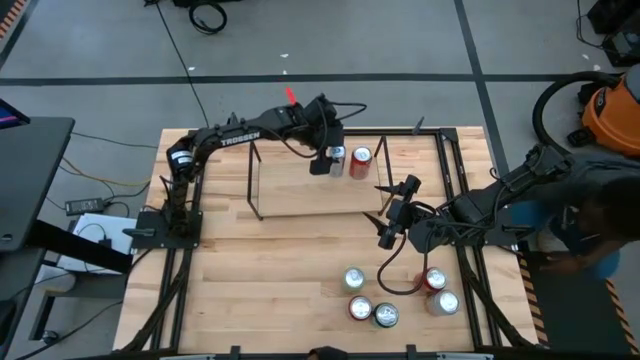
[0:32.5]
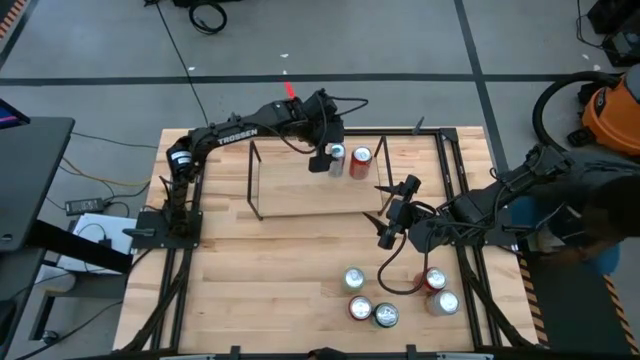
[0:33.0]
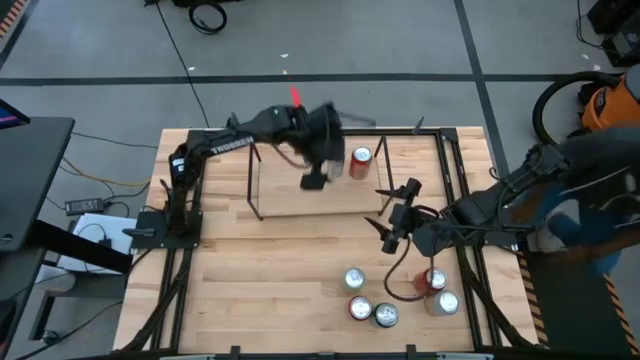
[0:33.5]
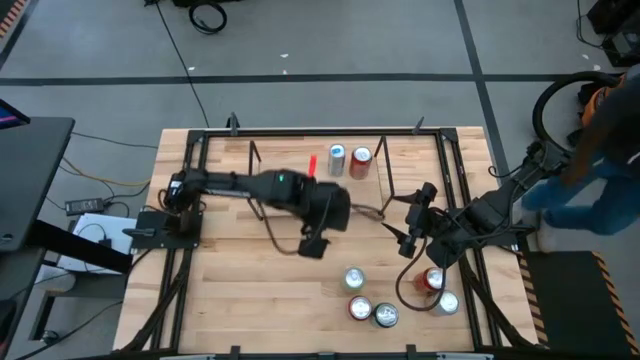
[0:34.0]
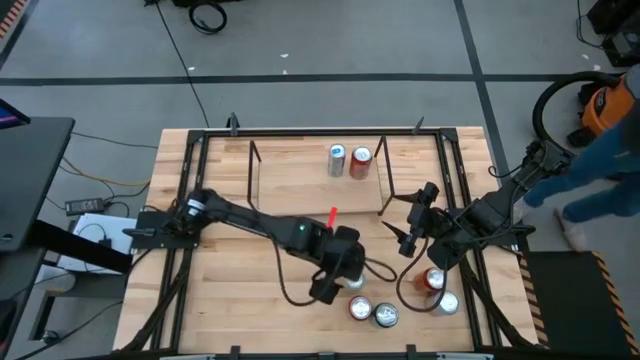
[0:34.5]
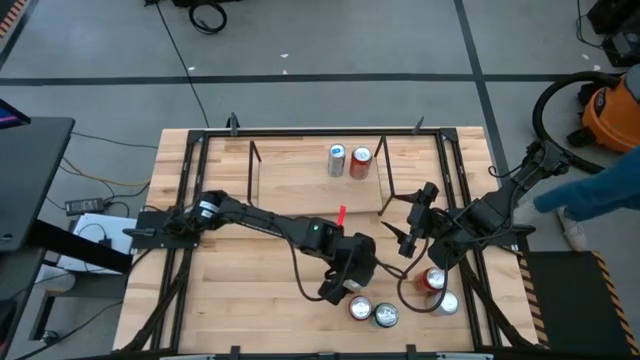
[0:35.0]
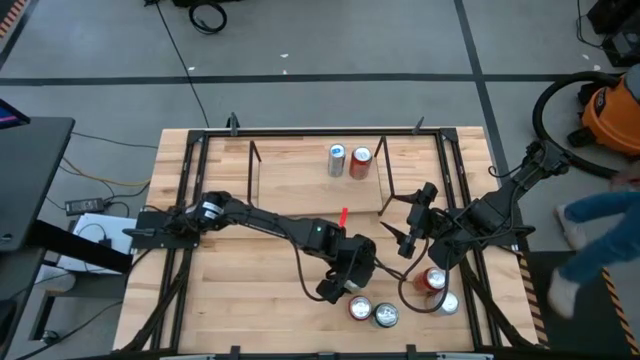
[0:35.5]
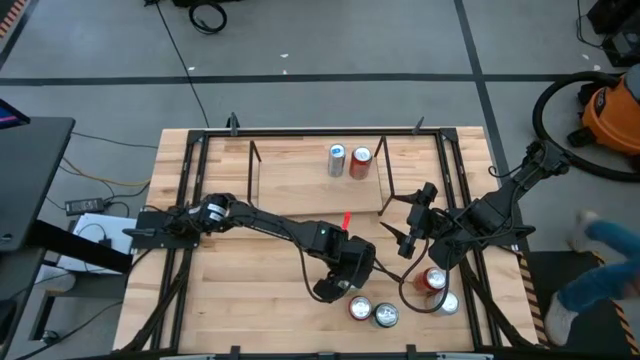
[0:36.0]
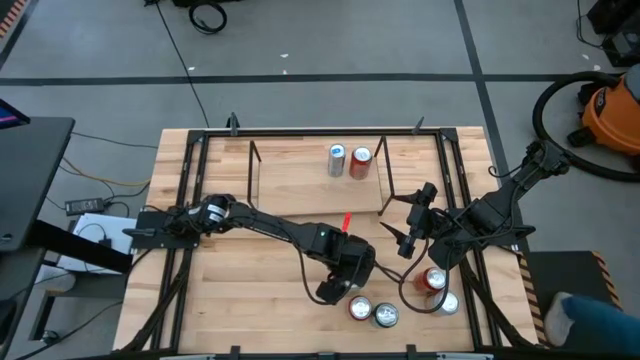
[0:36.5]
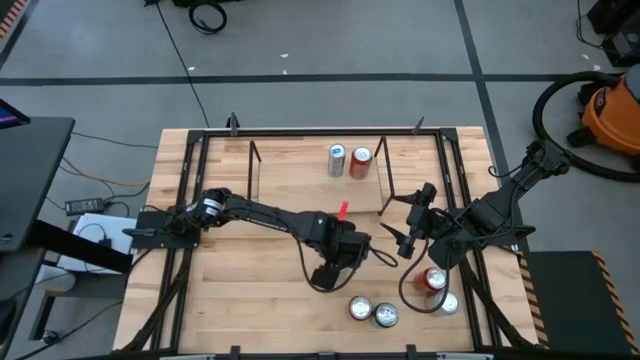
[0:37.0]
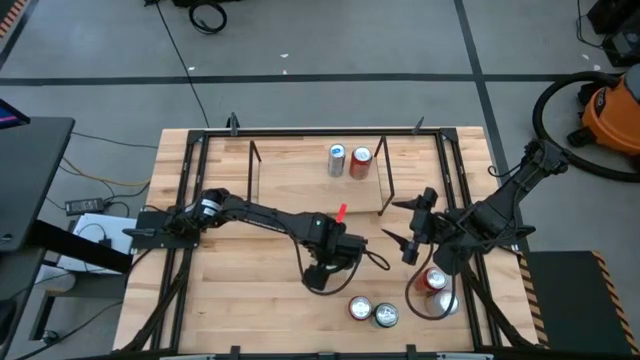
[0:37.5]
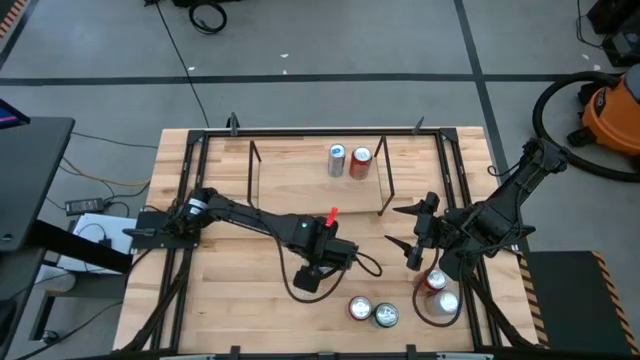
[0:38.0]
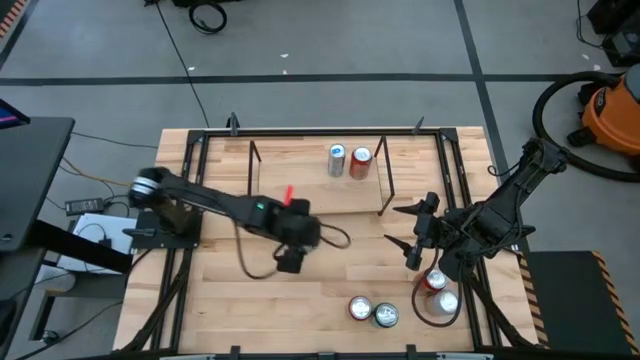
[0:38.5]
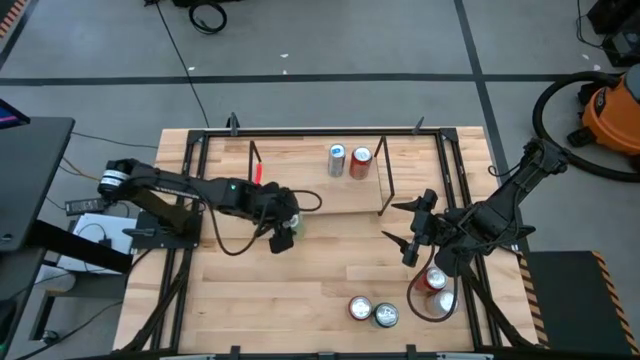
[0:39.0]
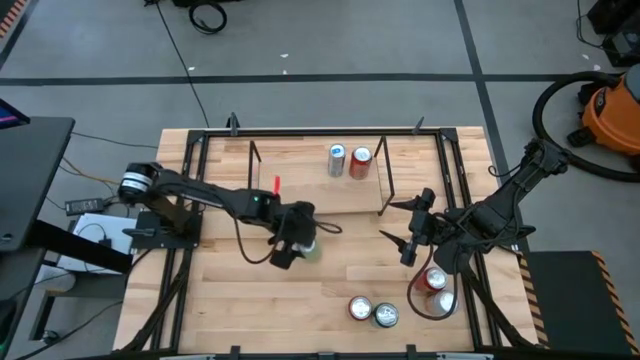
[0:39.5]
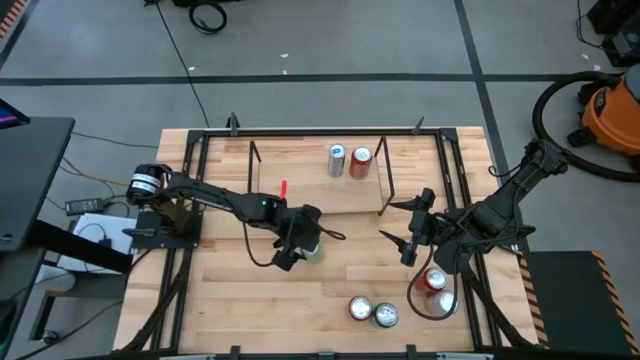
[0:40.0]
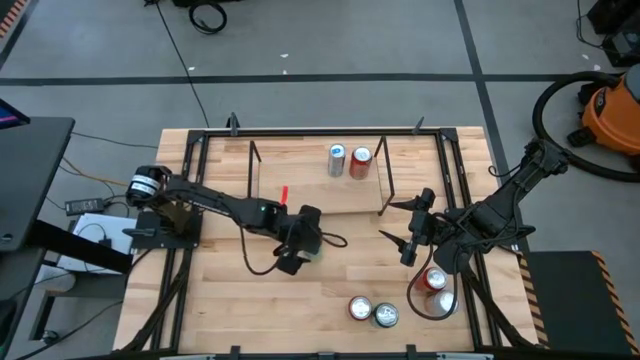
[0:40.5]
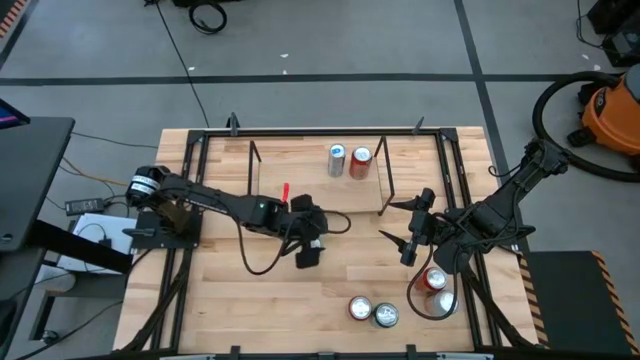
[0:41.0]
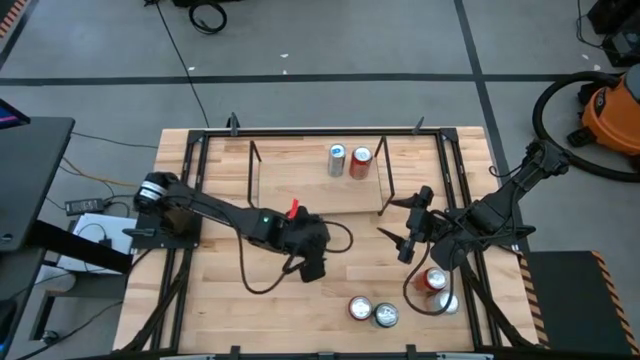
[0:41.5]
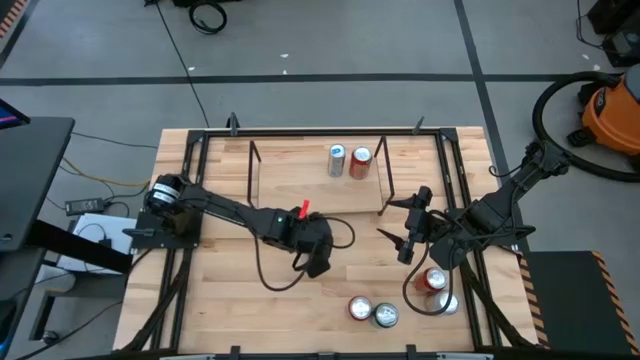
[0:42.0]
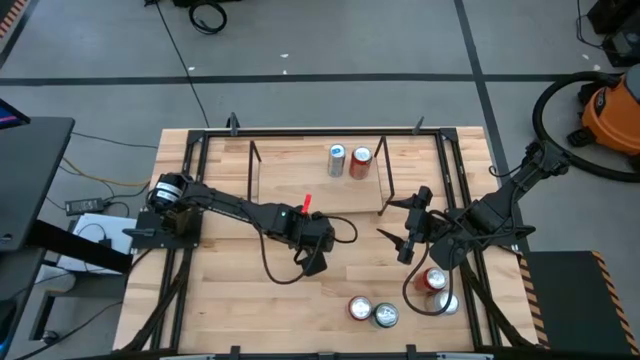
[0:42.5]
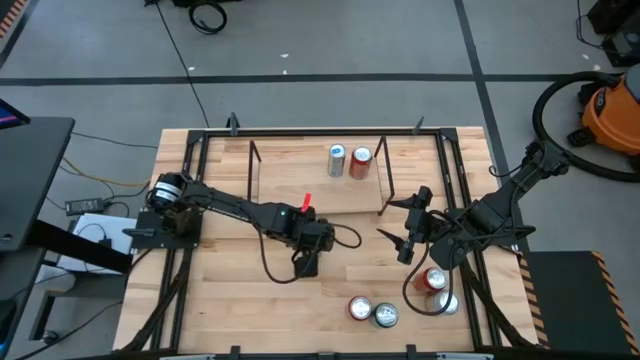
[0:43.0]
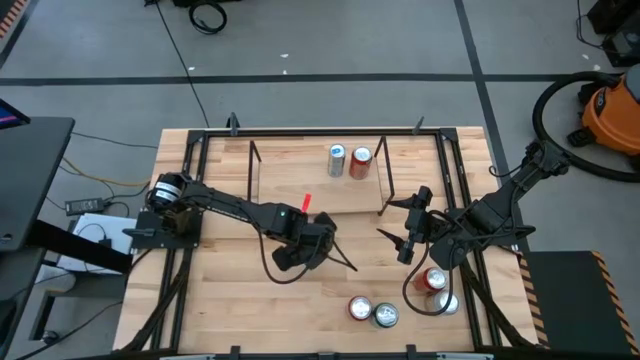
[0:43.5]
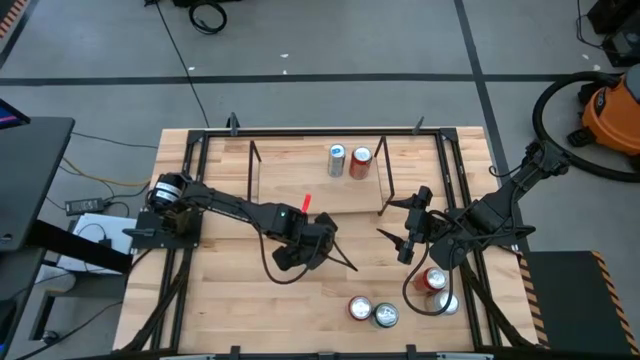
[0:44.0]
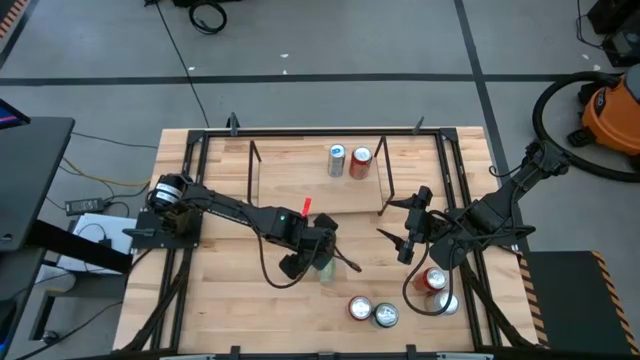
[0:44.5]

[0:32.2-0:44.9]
Task: Place canned beverage on shelf
Put the light green soda can on the shelf
